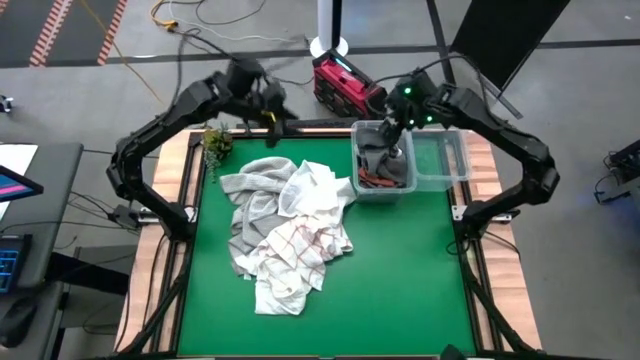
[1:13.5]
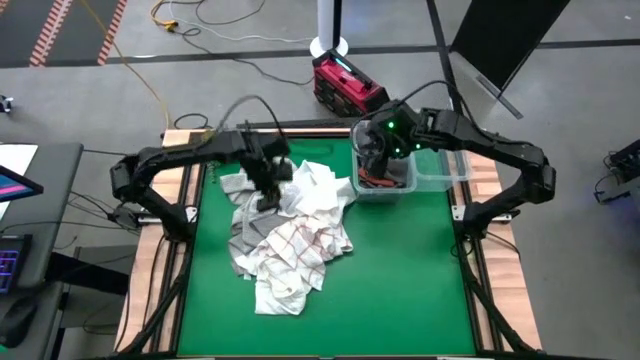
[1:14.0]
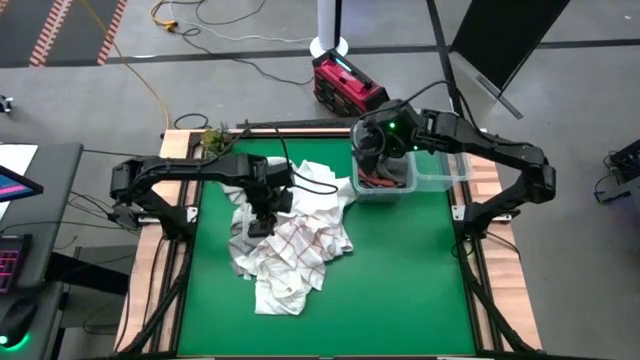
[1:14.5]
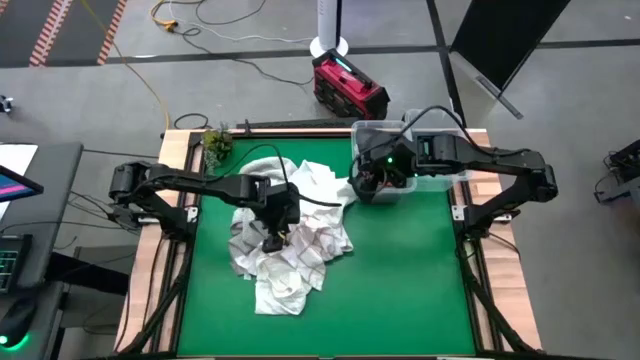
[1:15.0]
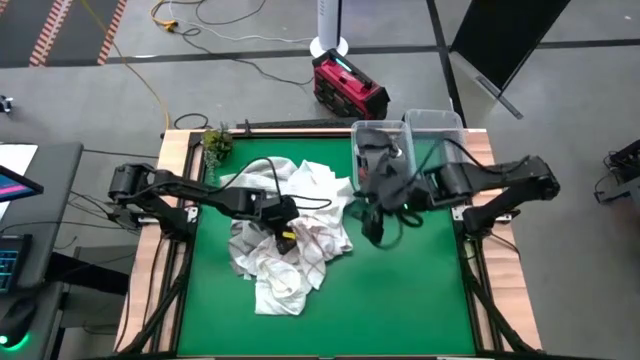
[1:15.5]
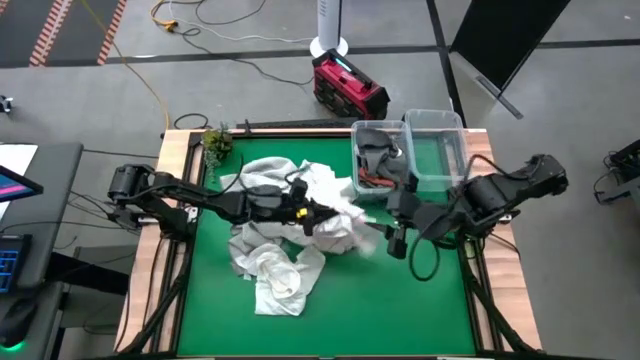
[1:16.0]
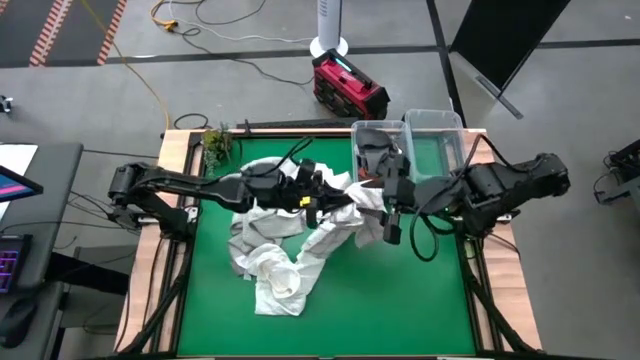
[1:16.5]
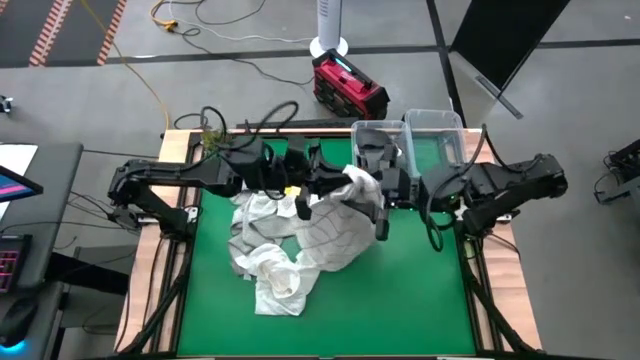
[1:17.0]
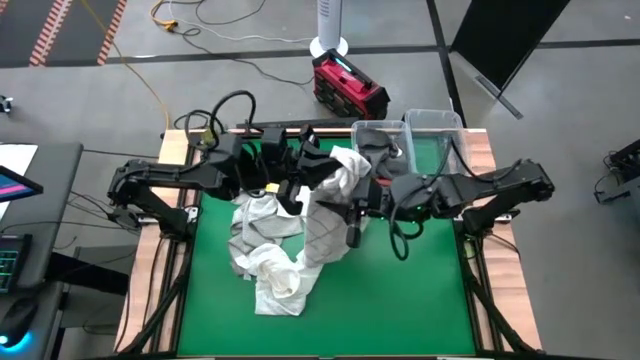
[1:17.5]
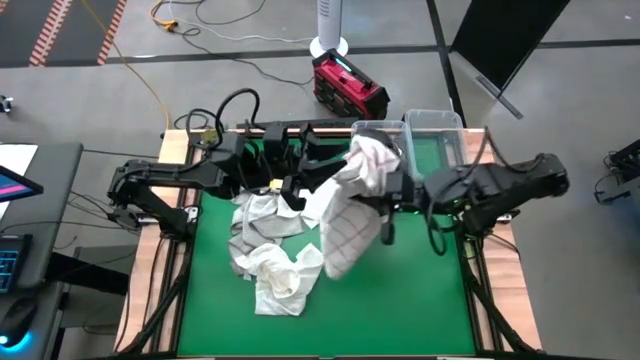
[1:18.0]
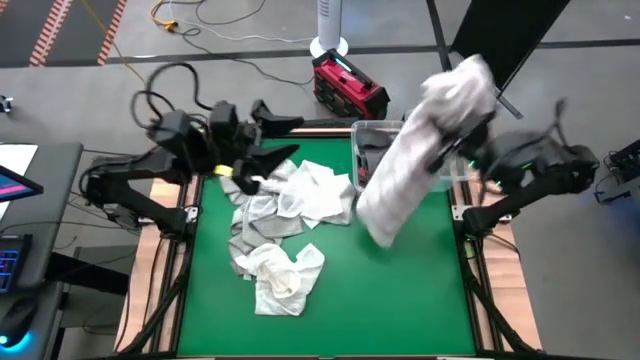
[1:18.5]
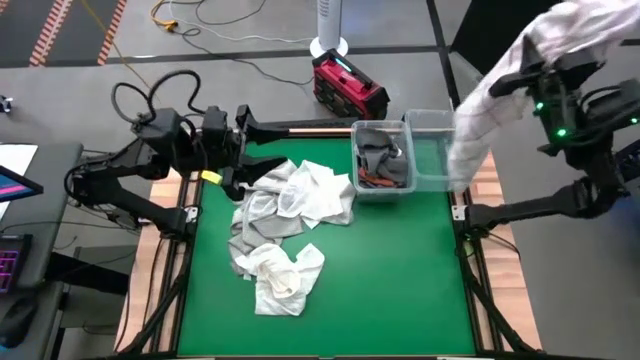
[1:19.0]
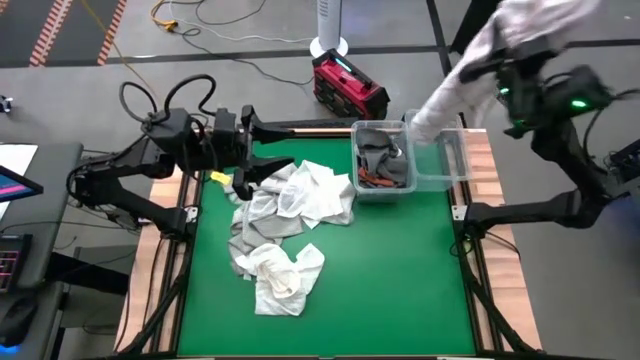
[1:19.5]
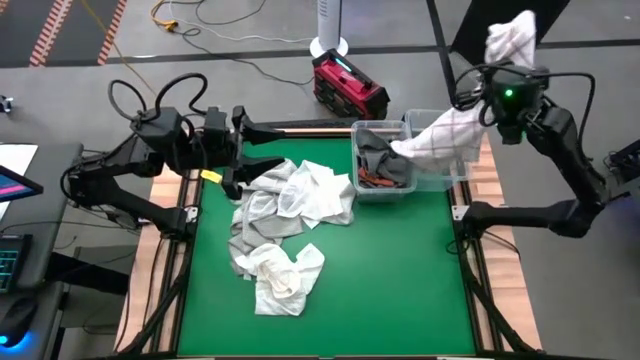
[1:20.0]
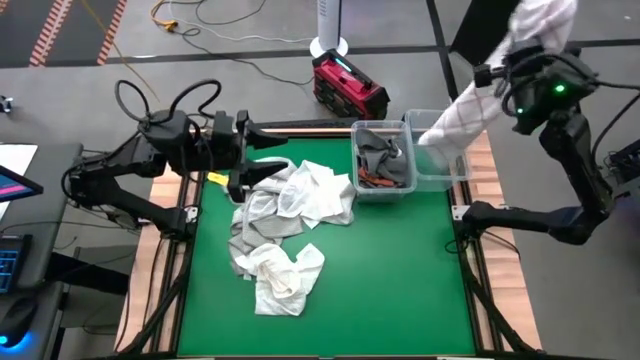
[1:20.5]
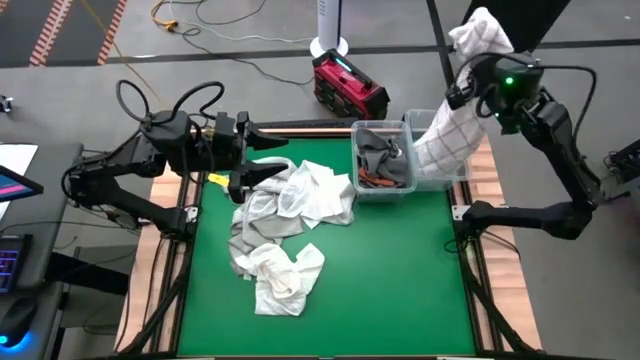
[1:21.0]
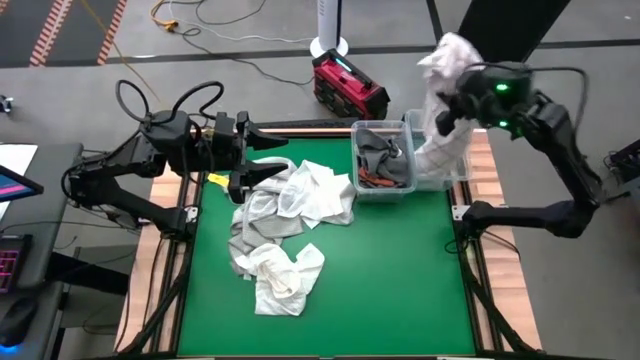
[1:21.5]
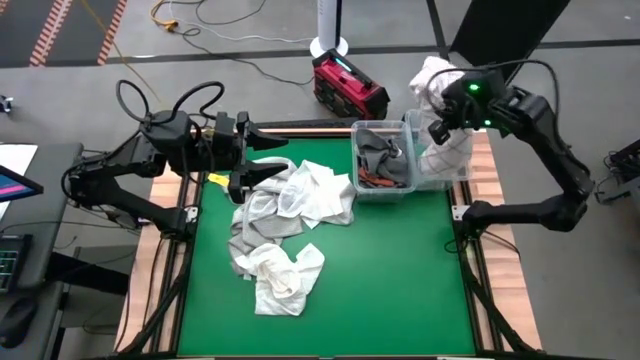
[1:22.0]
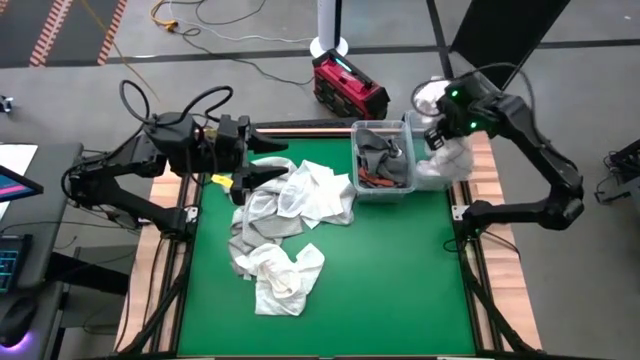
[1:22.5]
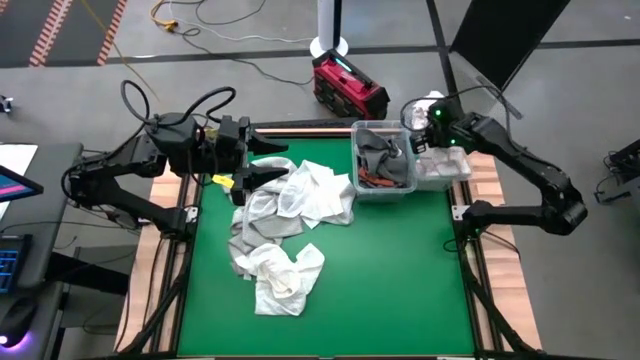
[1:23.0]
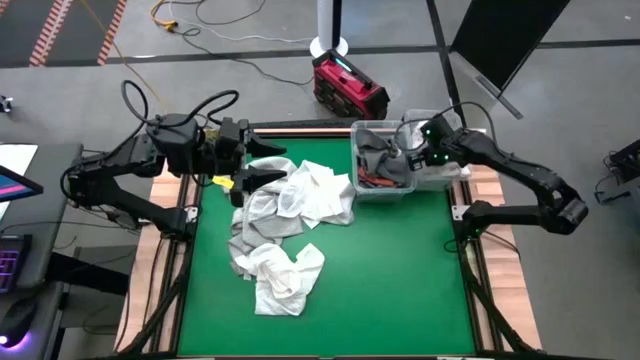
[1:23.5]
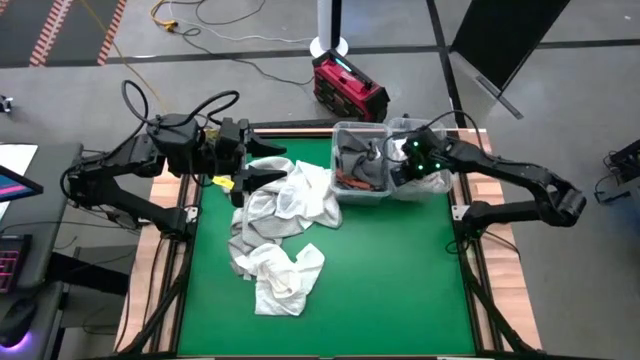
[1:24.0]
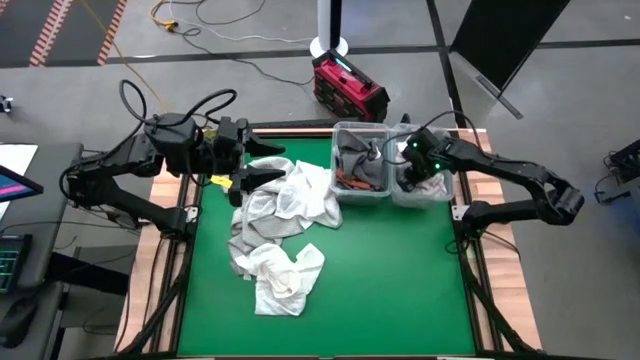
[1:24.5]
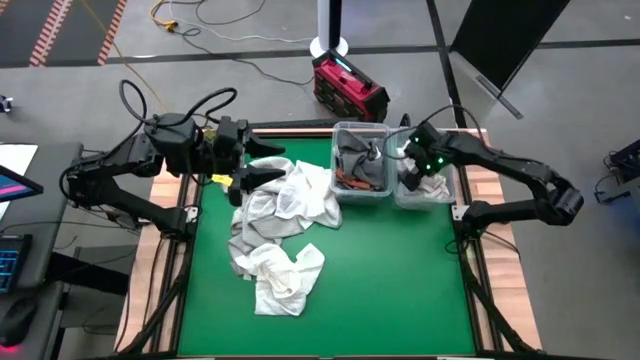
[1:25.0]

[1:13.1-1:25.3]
Task: Sort towels by color in basket
Put the white checkered towel into the right transparent bin

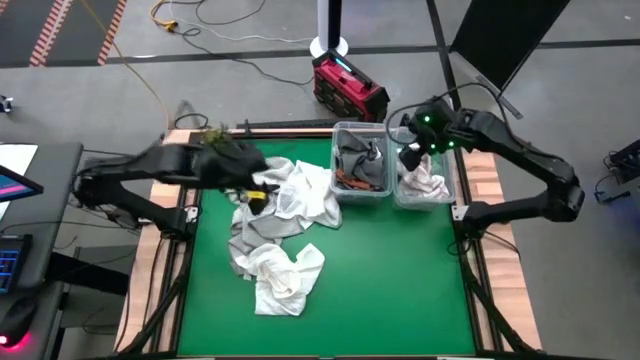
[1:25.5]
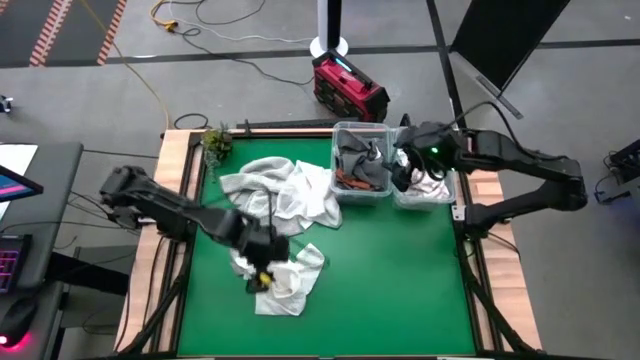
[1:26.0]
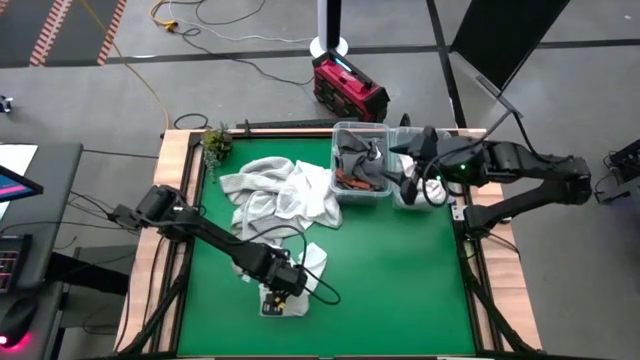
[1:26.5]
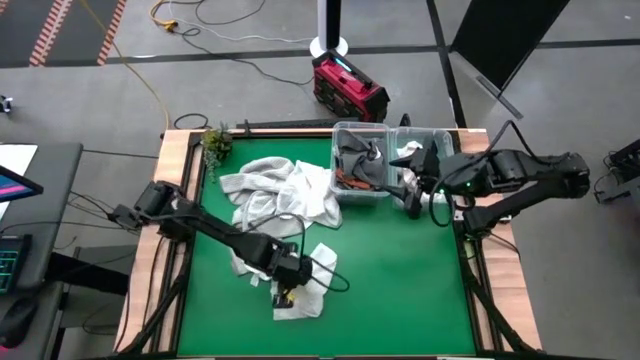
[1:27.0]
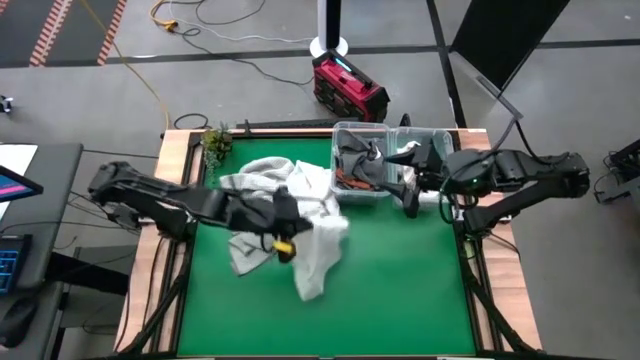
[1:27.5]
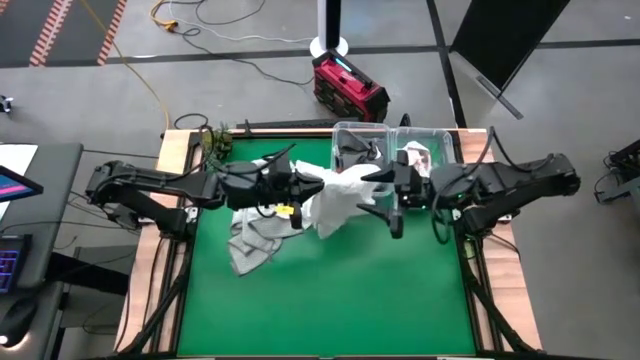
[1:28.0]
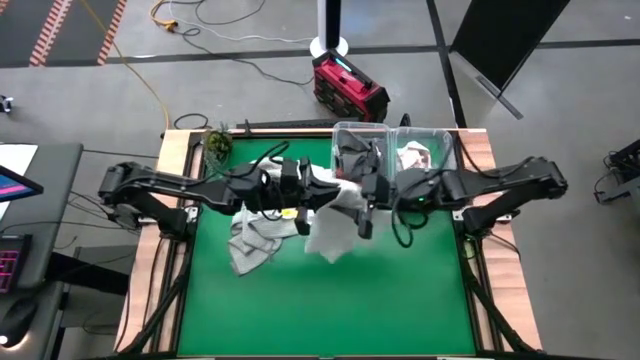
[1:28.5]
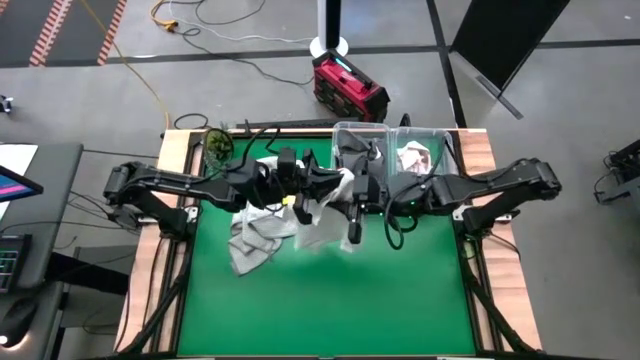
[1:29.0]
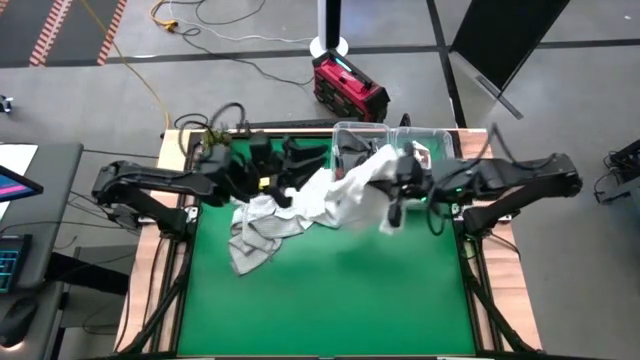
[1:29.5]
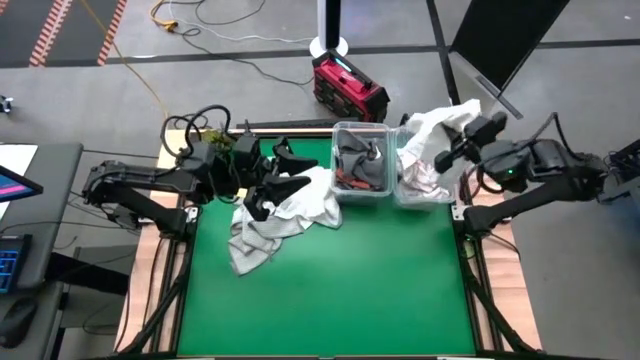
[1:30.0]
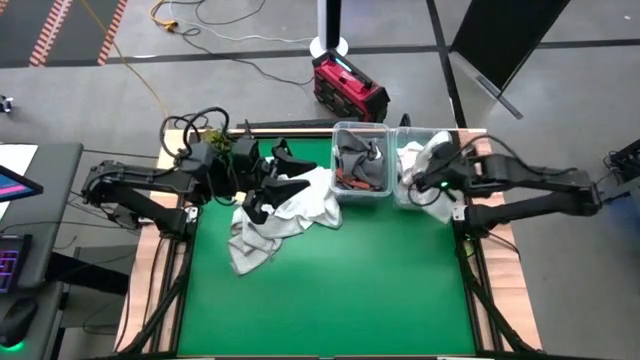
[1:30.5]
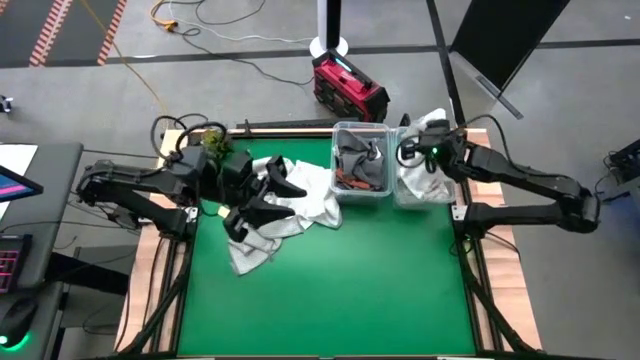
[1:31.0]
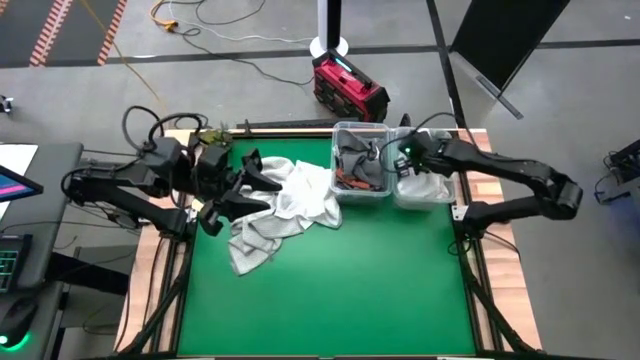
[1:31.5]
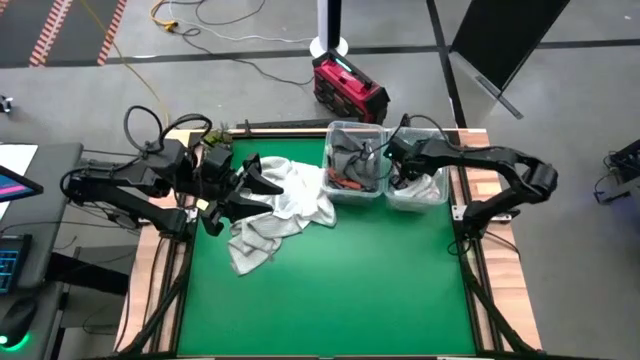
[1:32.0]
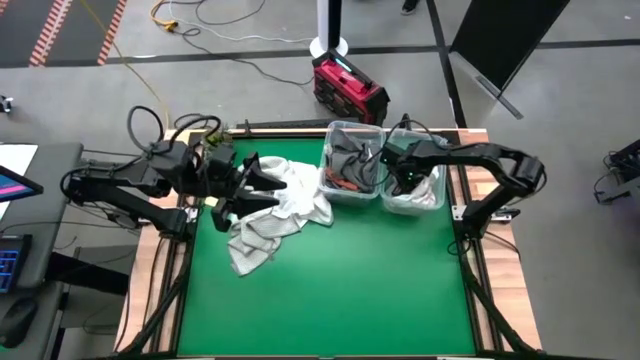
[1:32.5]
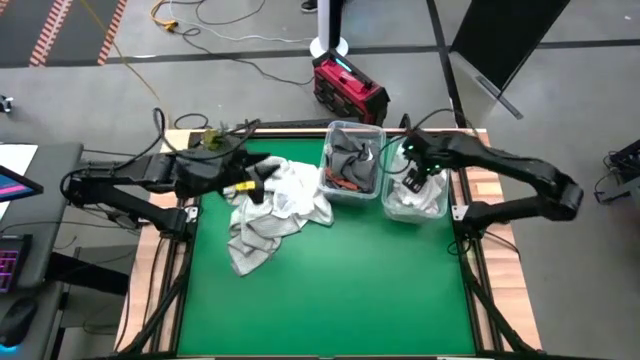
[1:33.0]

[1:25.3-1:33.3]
Put the bottom white towel into the right transparent bin

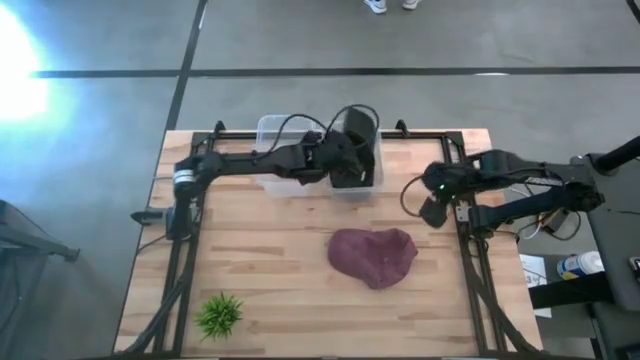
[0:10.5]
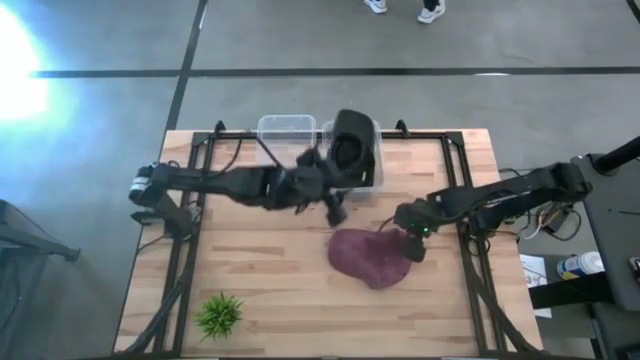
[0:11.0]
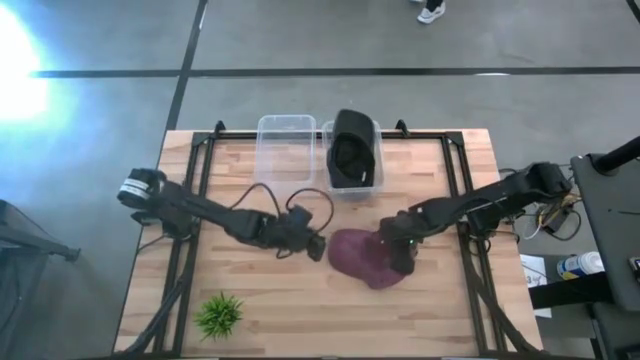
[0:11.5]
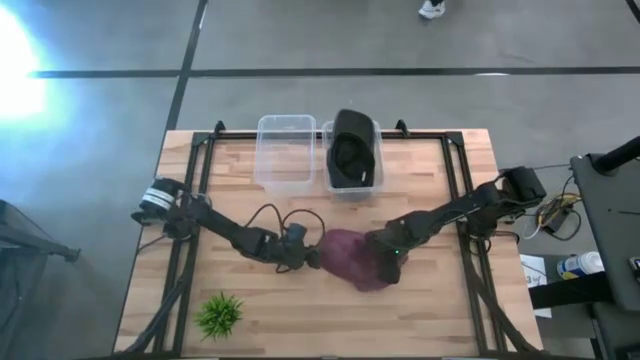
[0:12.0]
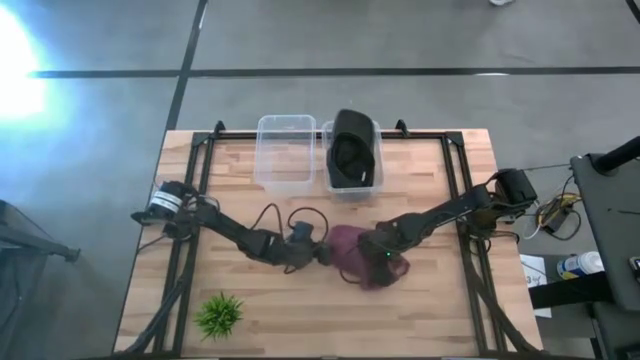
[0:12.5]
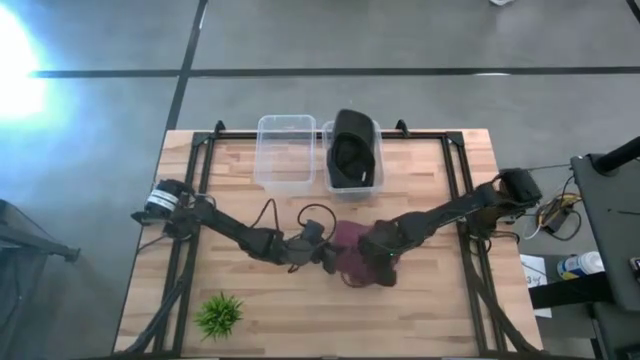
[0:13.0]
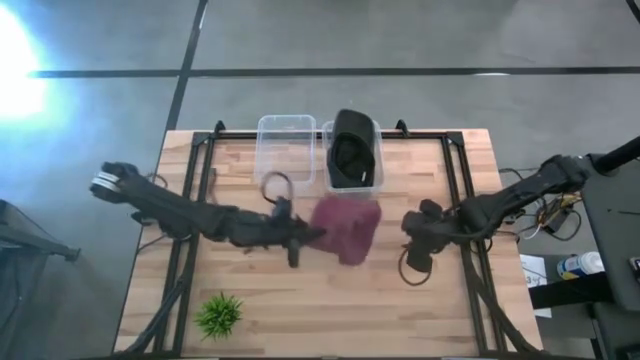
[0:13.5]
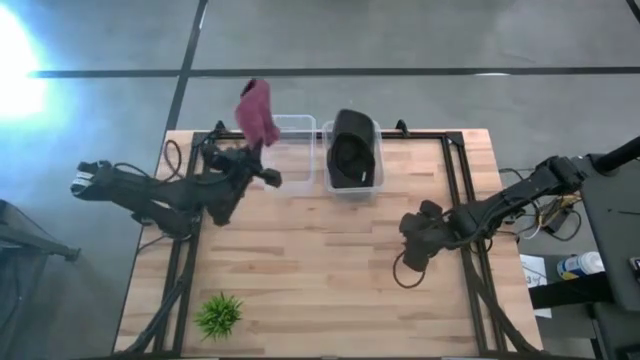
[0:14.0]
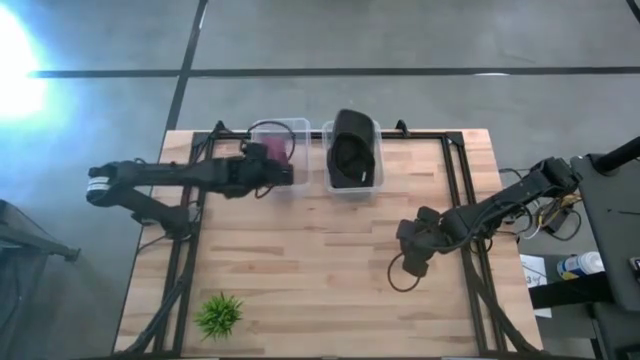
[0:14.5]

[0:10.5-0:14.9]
Task: Pick & Place hat
Put the pink cap into the left transparent bin
